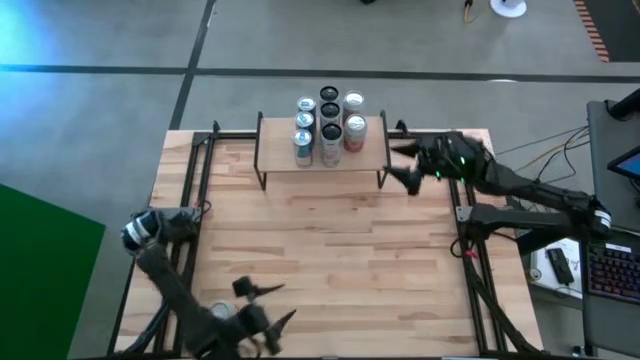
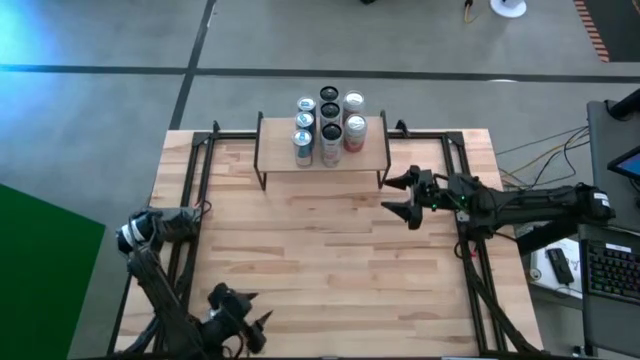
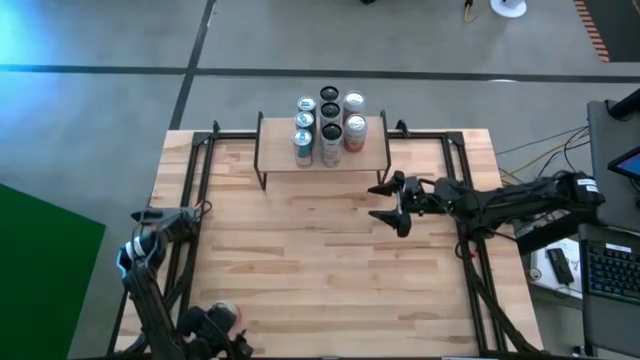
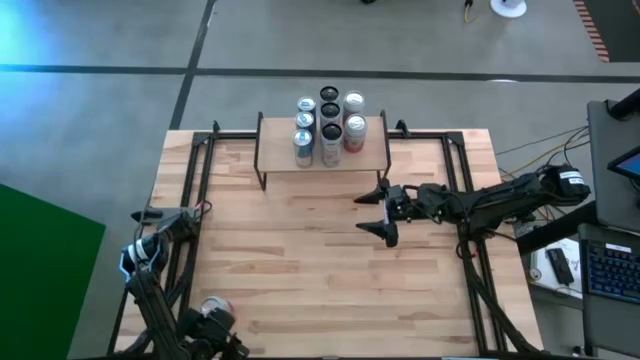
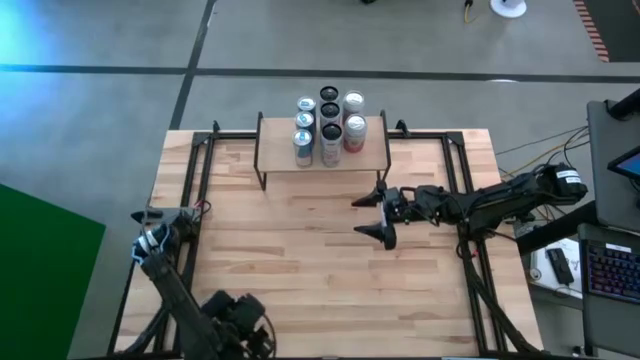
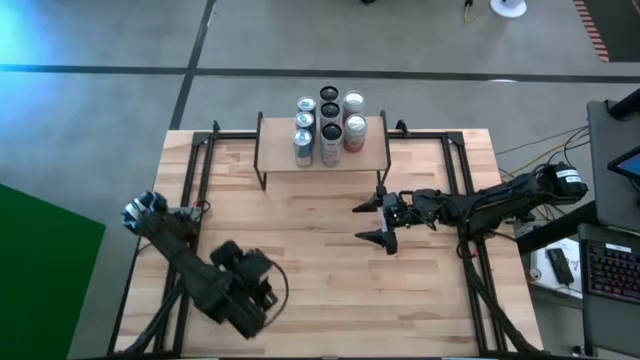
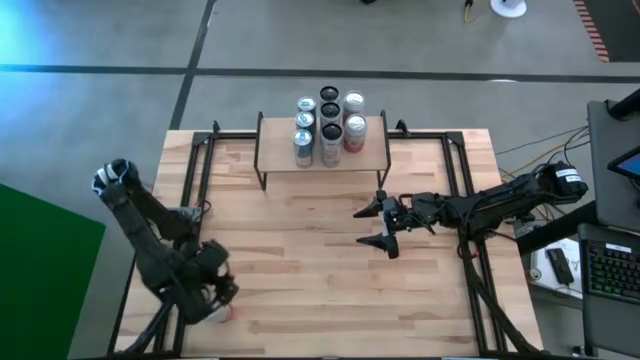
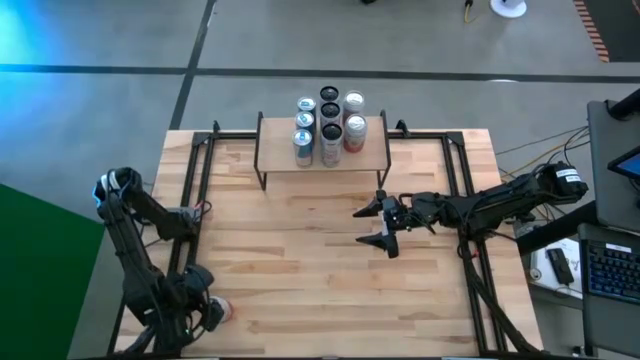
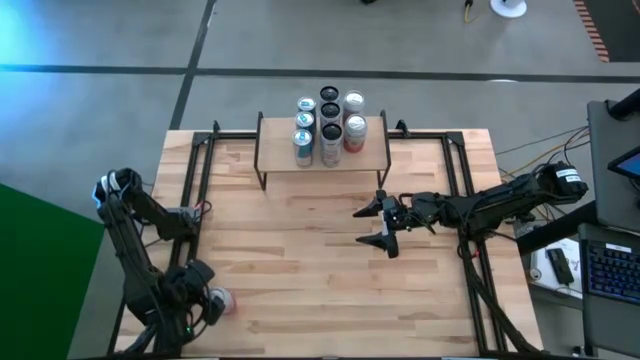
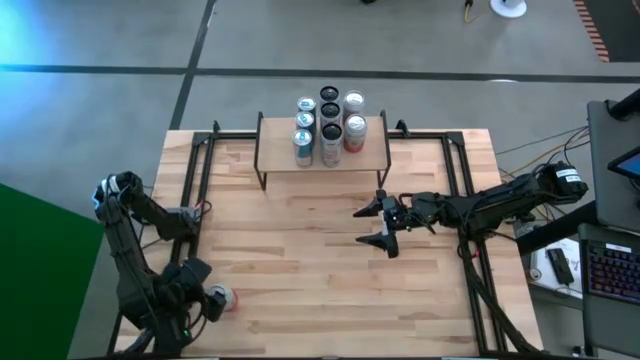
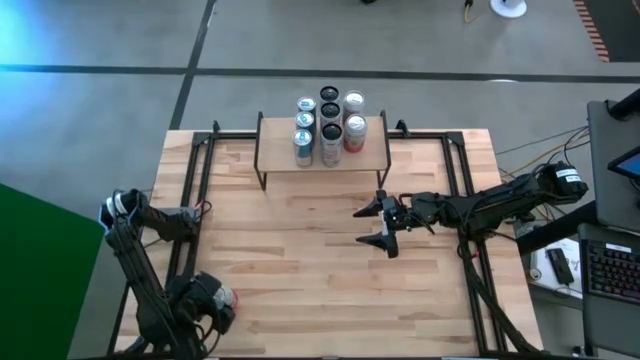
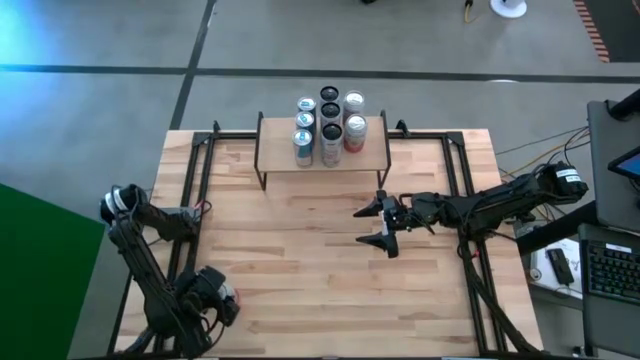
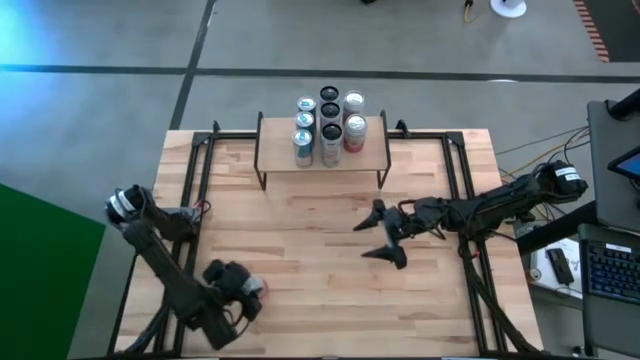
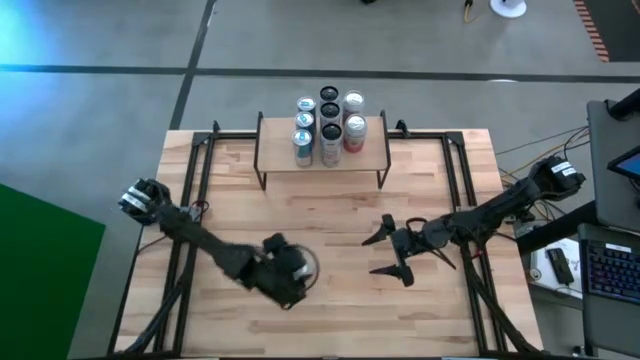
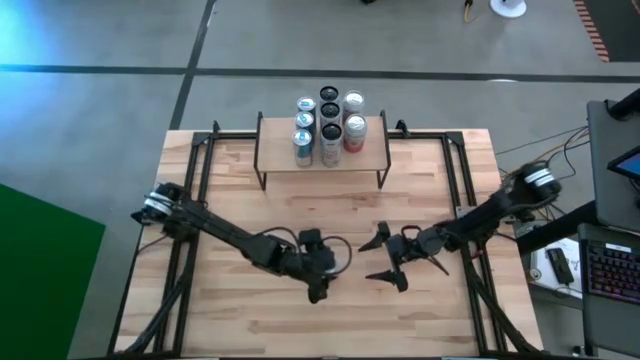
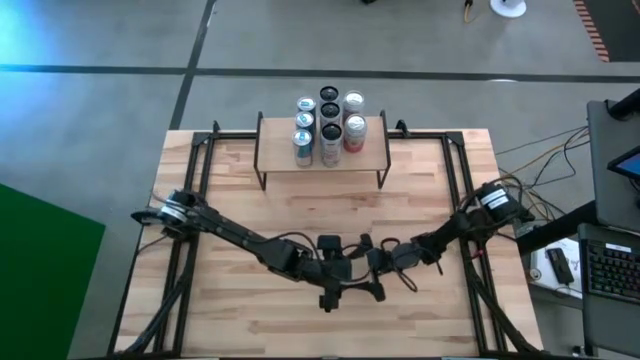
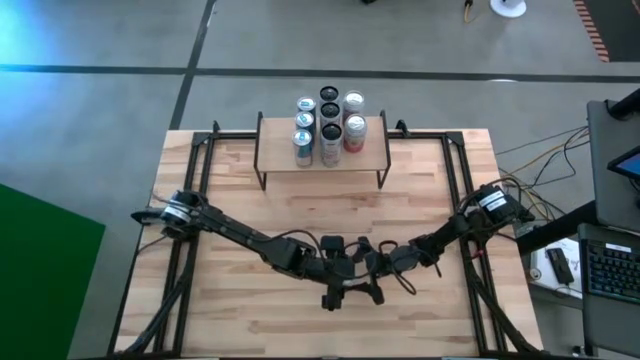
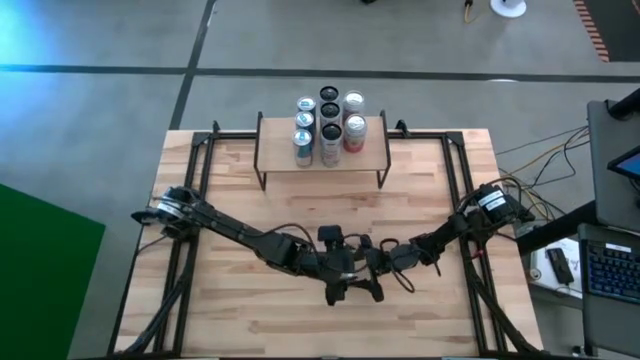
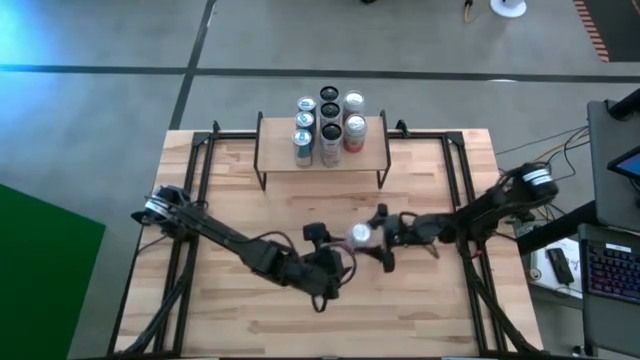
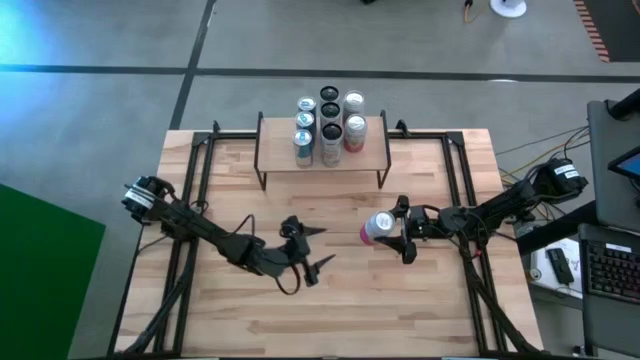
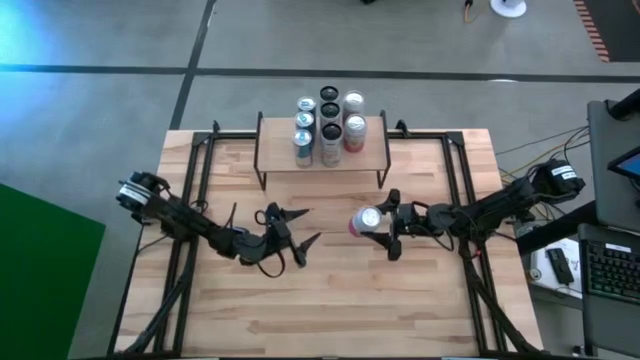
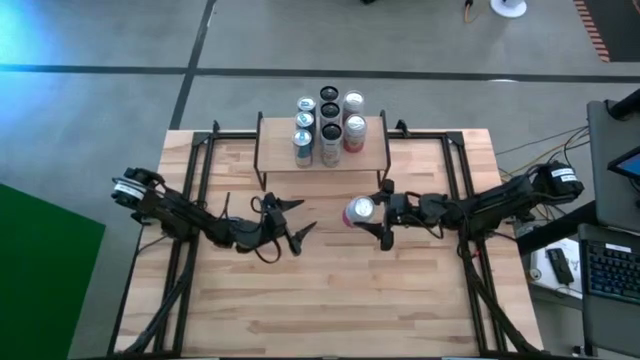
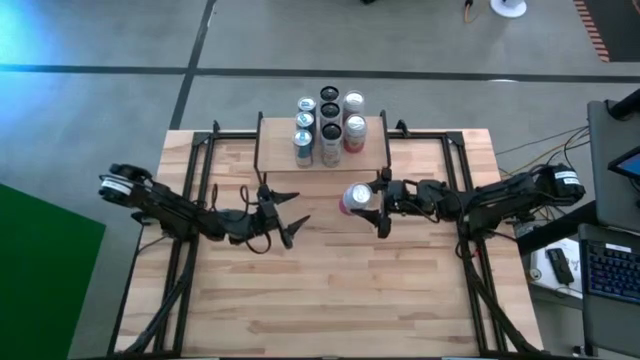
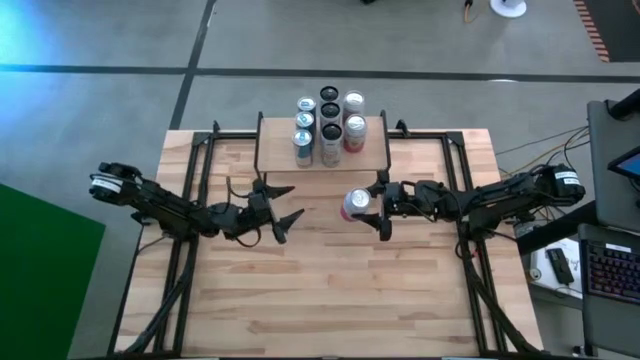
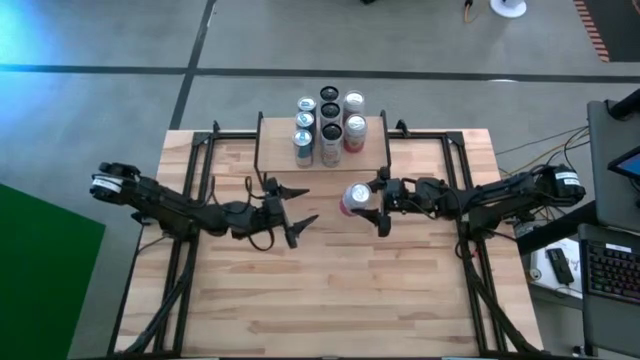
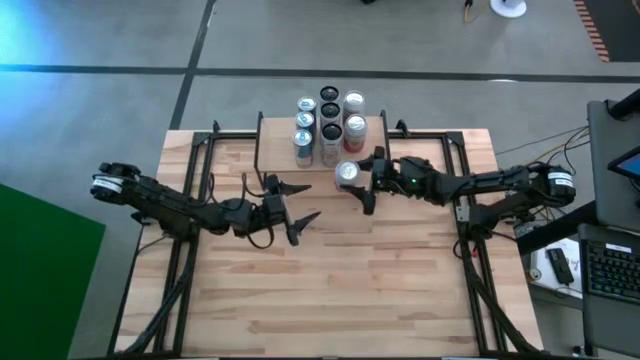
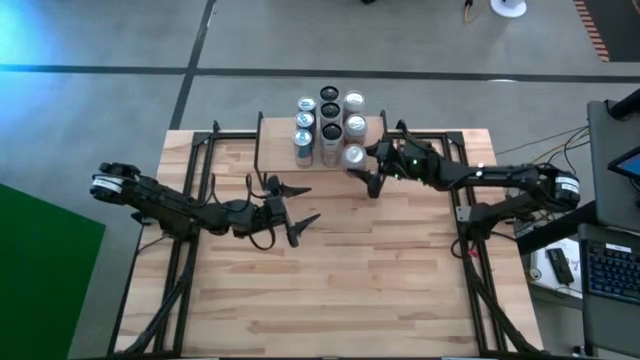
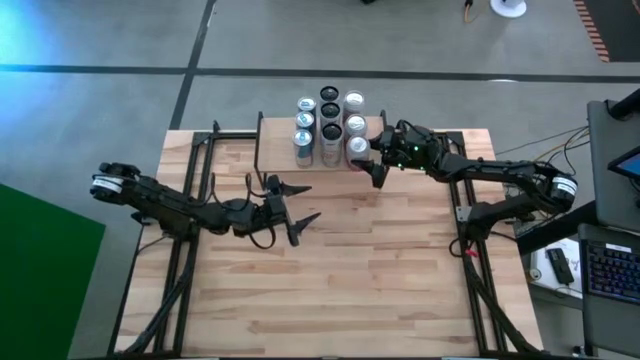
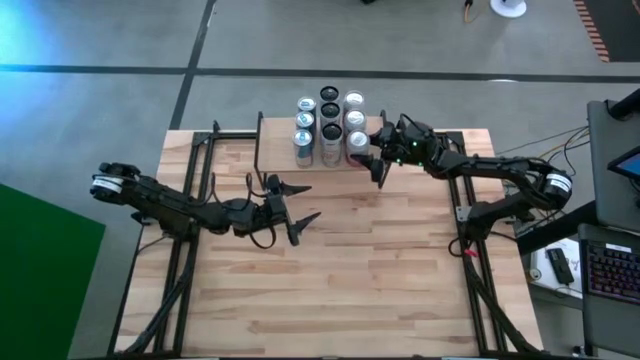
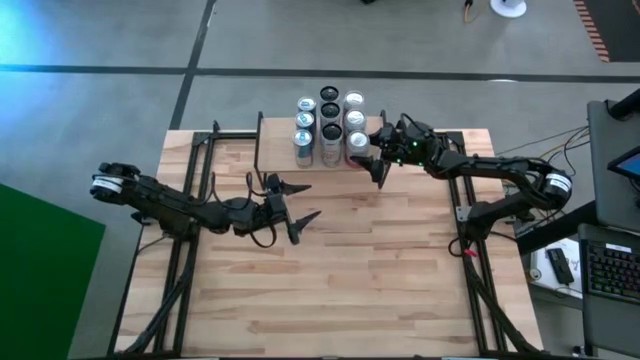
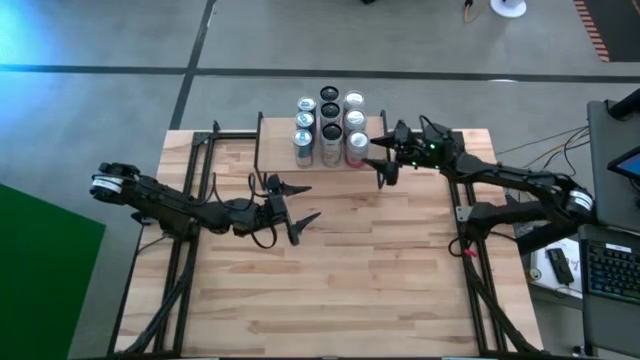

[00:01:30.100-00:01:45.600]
Task: Place canned beverage on shelf
Align the pink-white soda can with the other pink-white soda can on the shelf

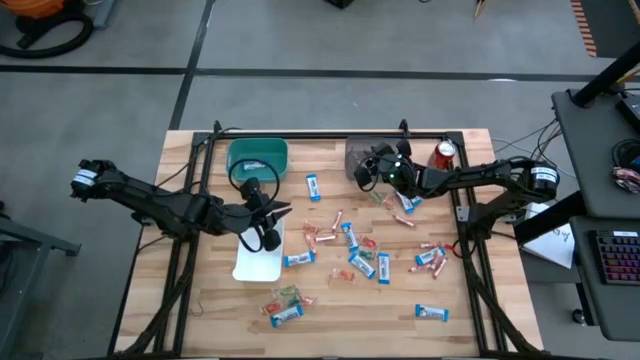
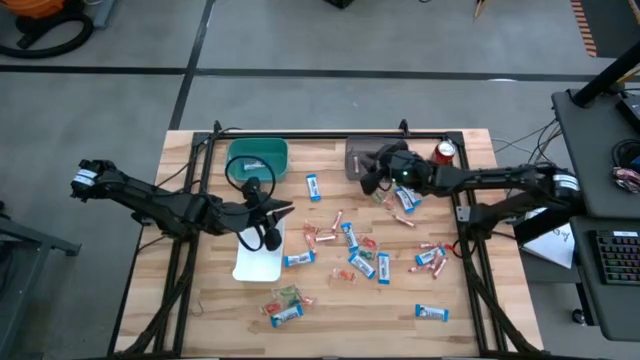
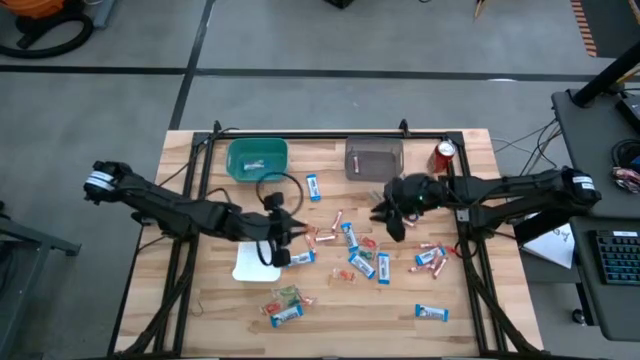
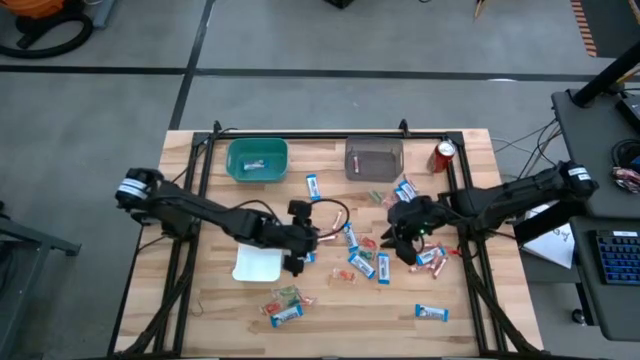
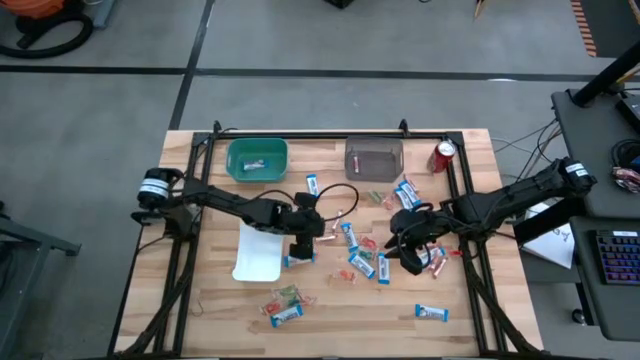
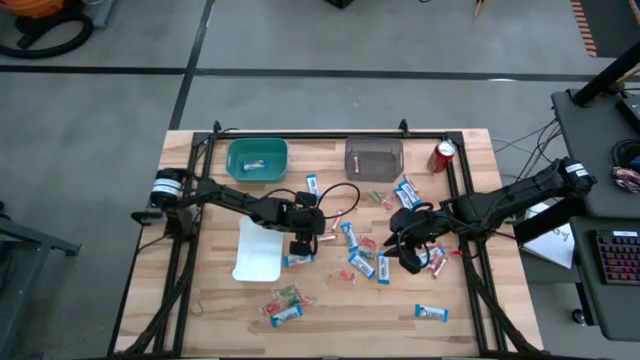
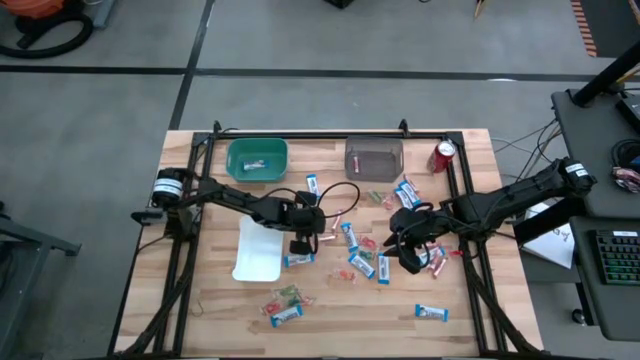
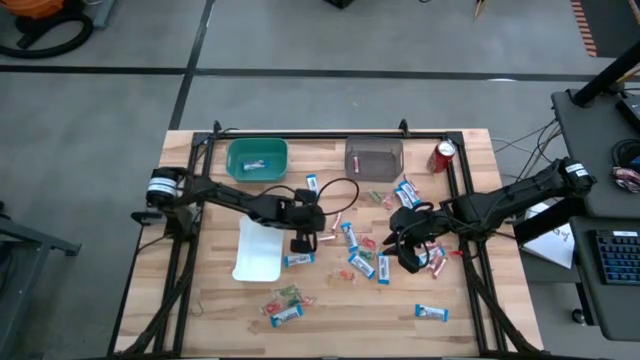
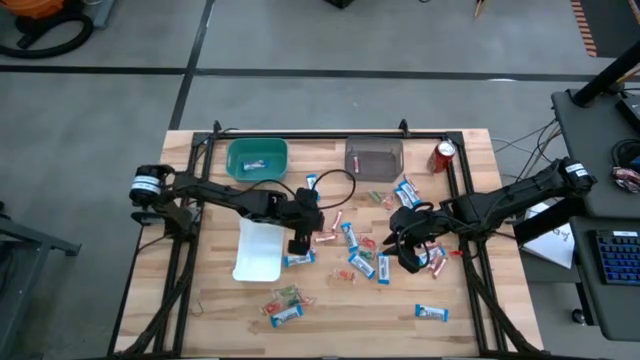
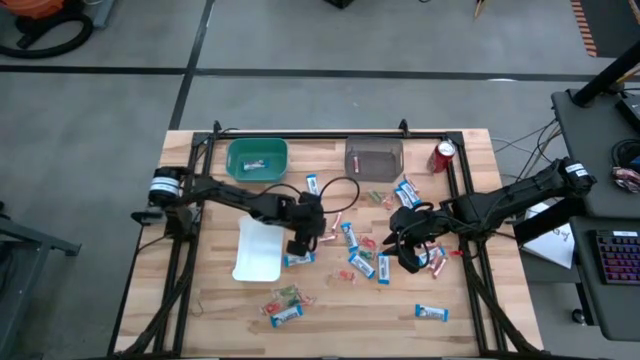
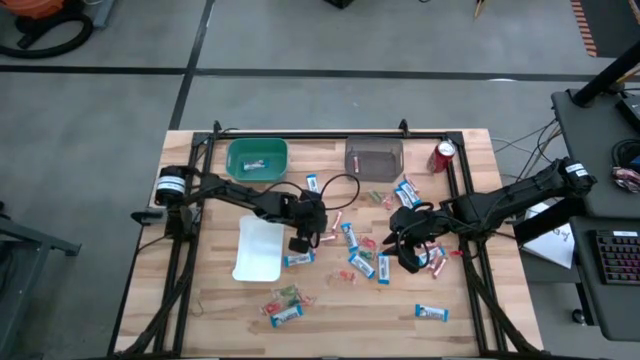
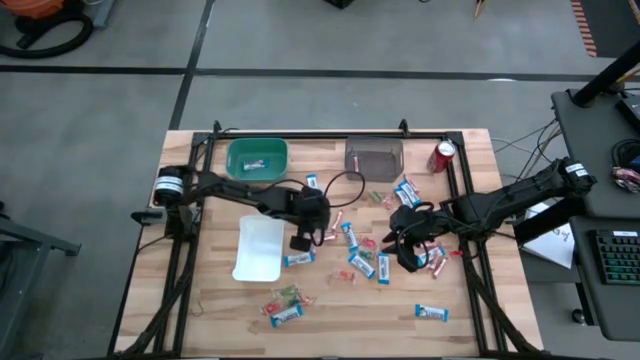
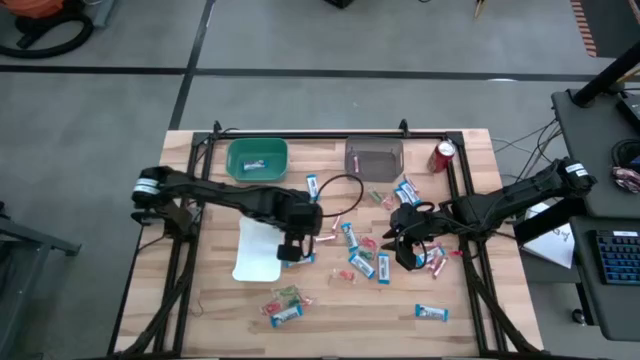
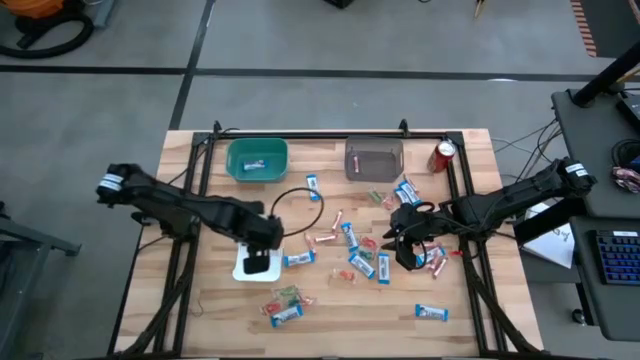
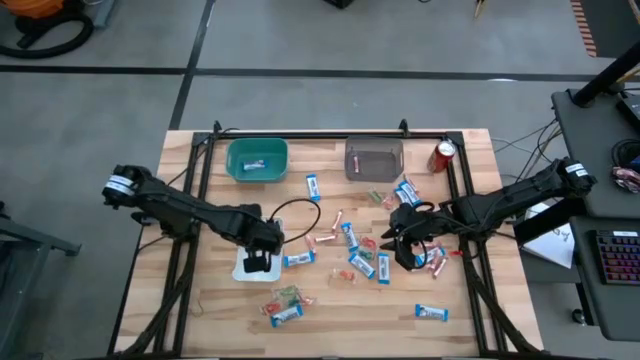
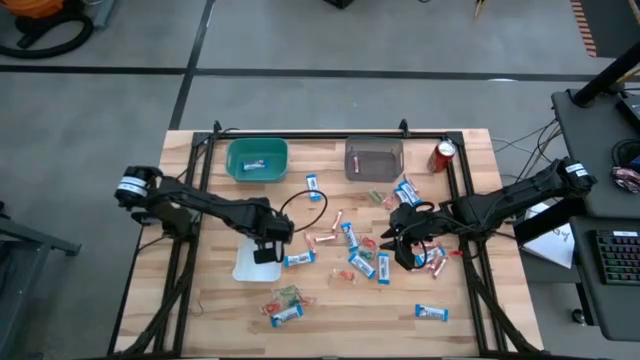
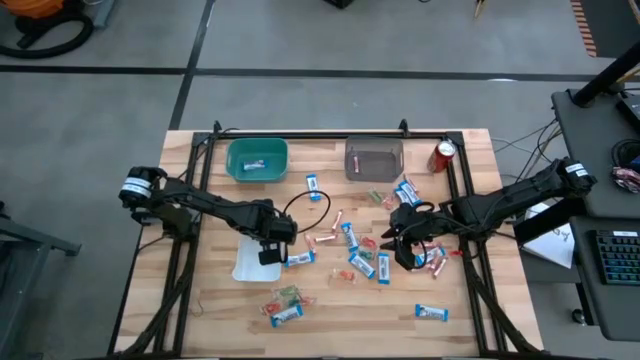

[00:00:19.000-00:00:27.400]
Task: Sort candy
Put the orange gummy candy into the white bin
